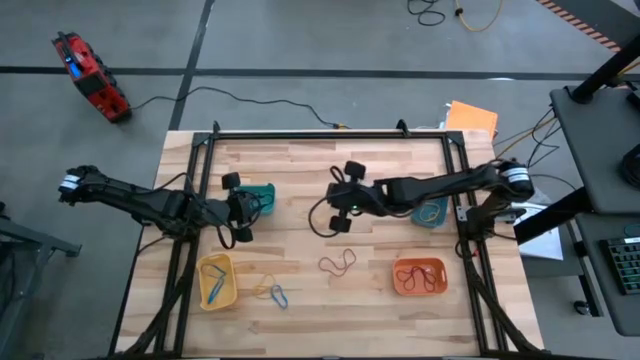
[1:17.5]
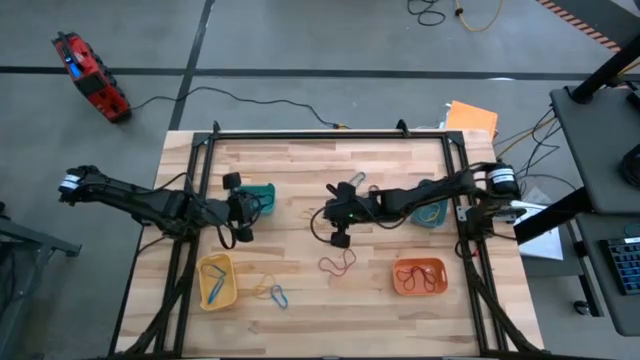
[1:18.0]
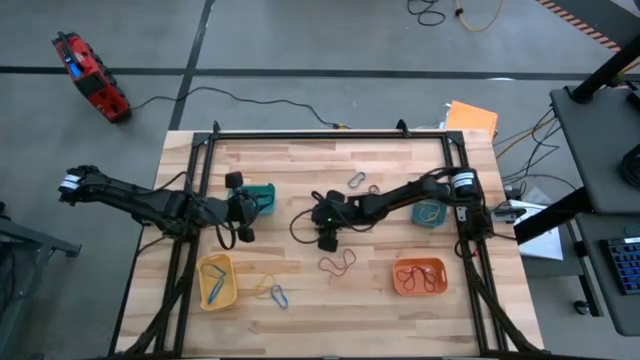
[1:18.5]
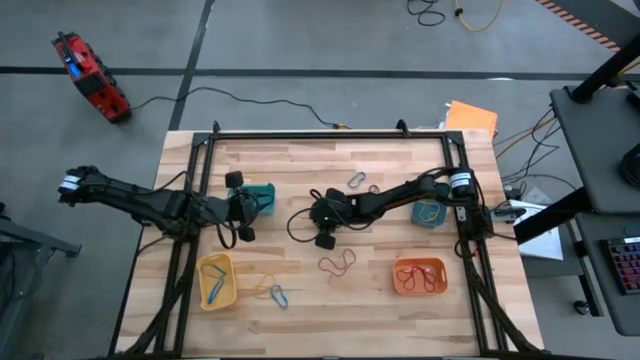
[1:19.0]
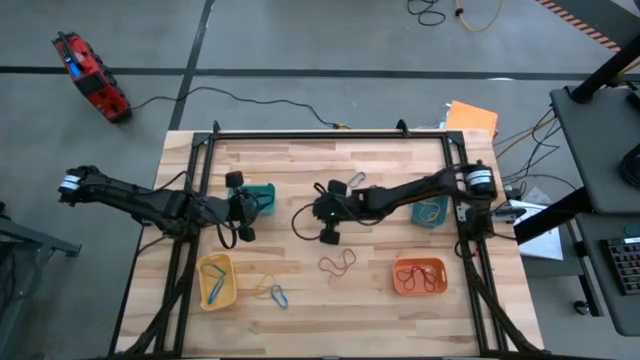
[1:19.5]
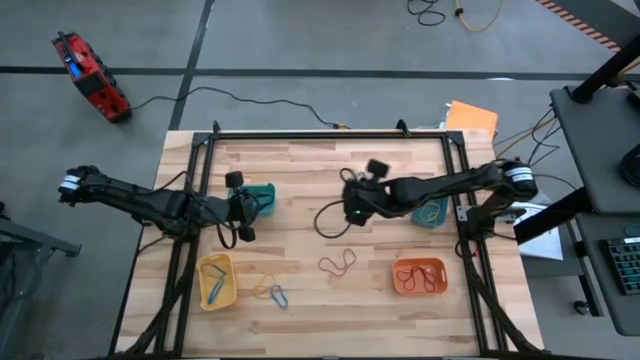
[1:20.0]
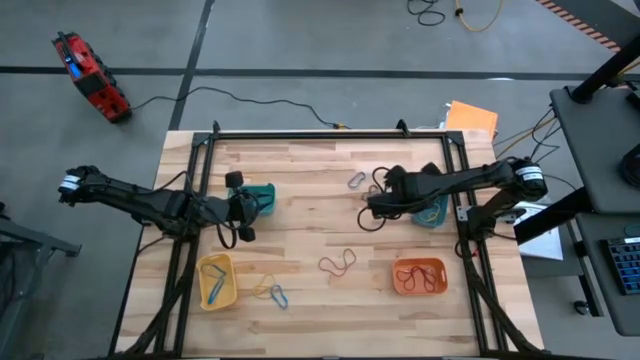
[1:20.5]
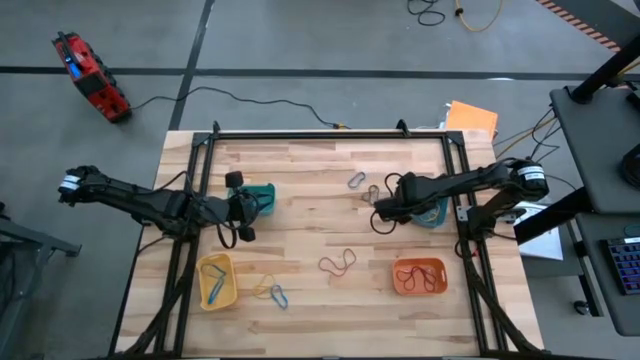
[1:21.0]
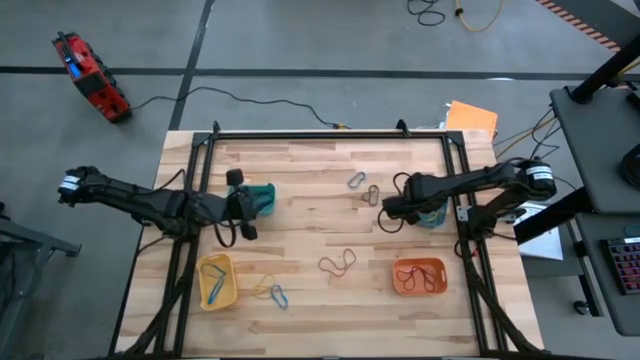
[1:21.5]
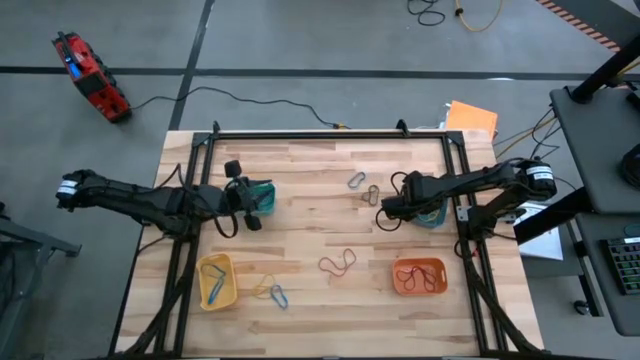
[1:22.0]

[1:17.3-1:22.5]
Task: Sort rubber bands into baskets
Put the yellow rubber band into the blue bin

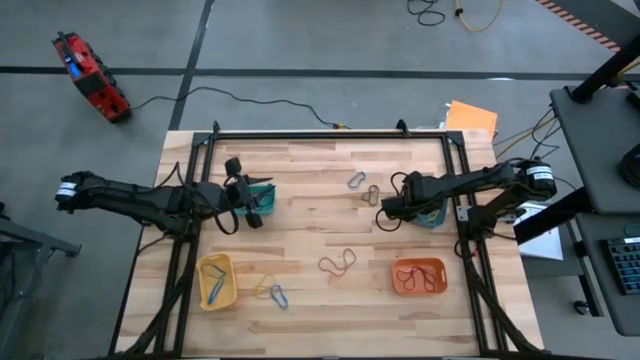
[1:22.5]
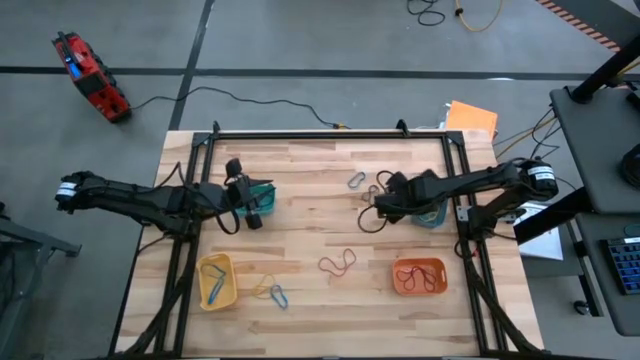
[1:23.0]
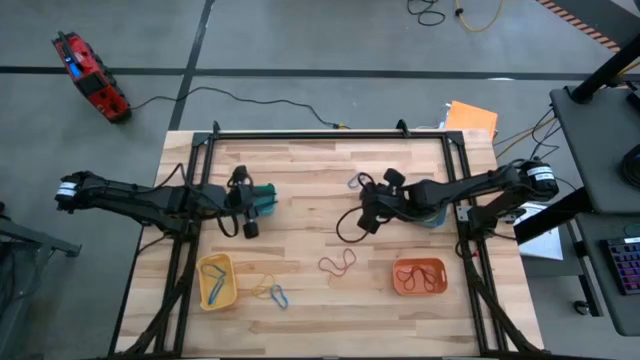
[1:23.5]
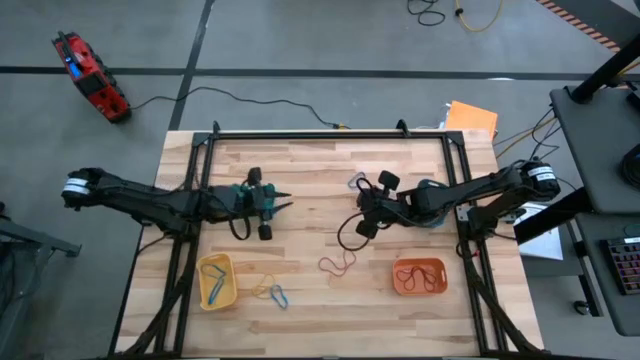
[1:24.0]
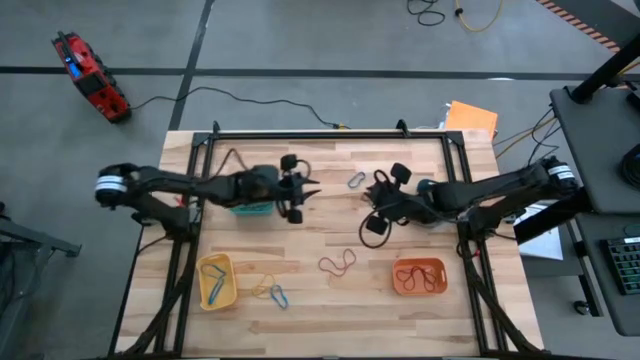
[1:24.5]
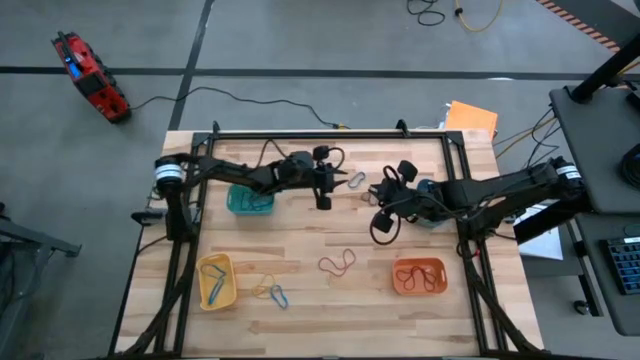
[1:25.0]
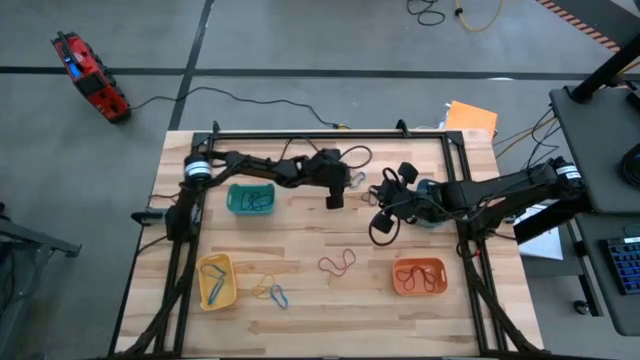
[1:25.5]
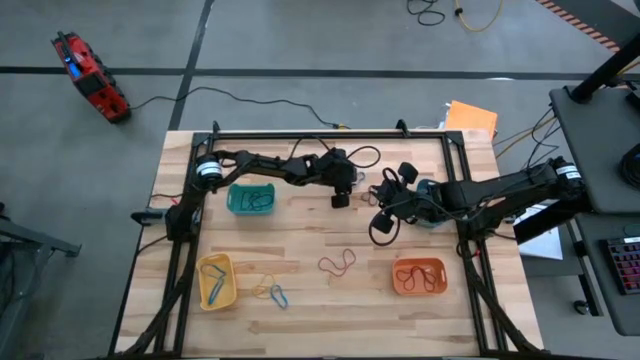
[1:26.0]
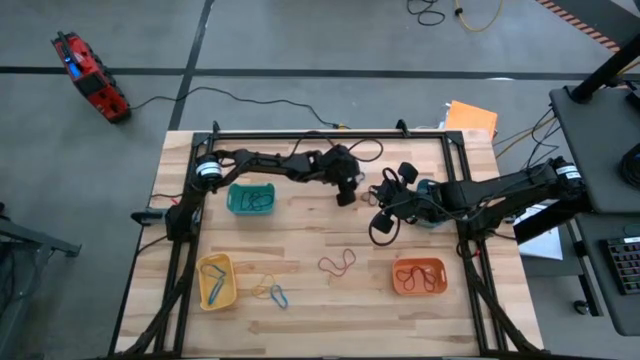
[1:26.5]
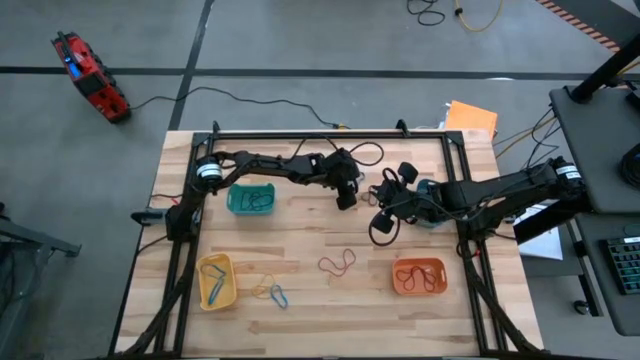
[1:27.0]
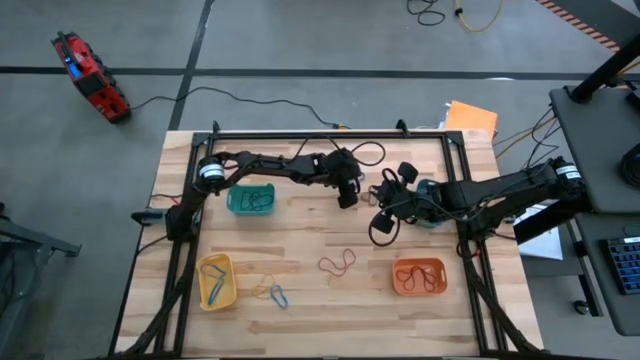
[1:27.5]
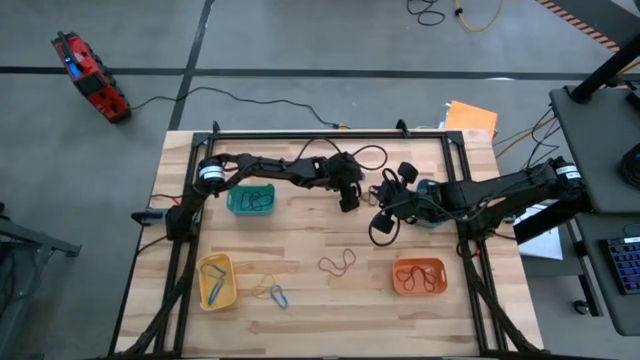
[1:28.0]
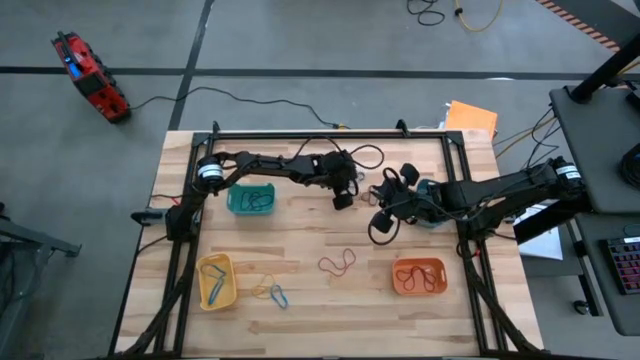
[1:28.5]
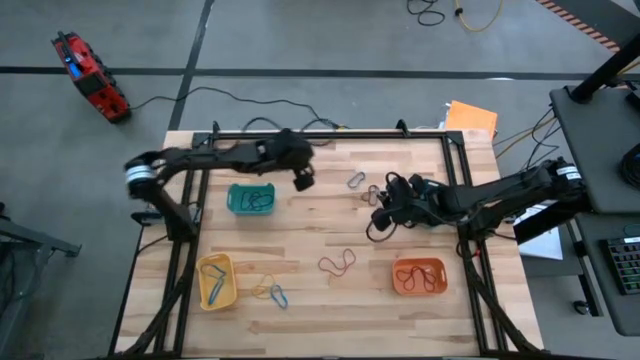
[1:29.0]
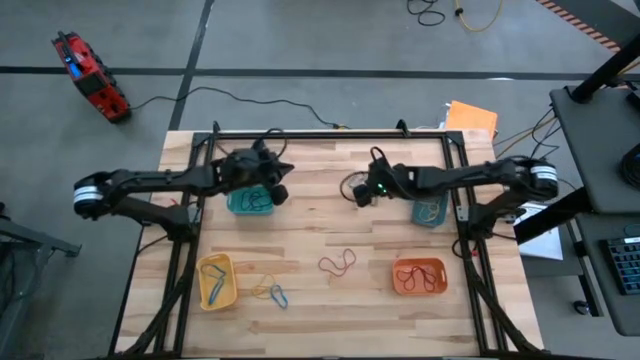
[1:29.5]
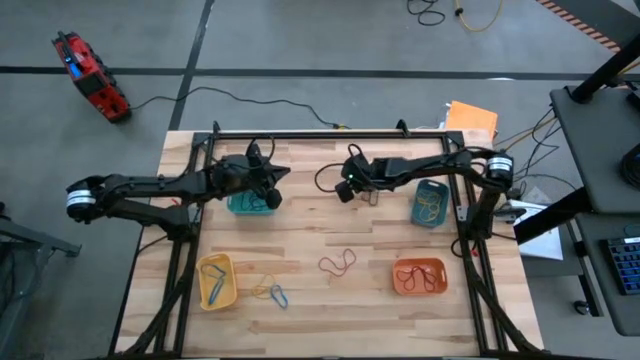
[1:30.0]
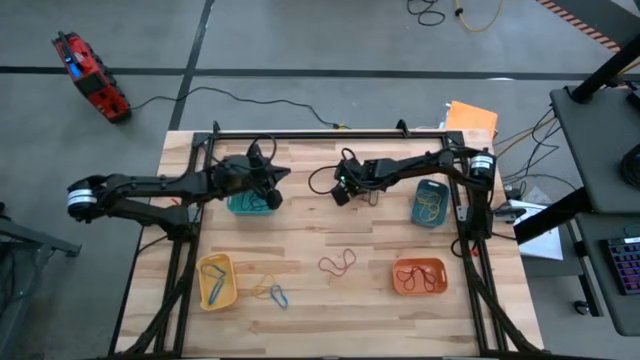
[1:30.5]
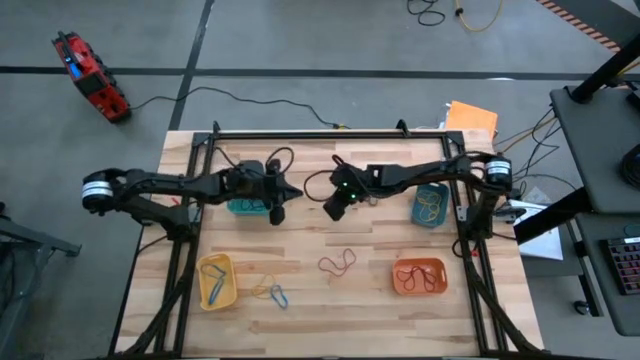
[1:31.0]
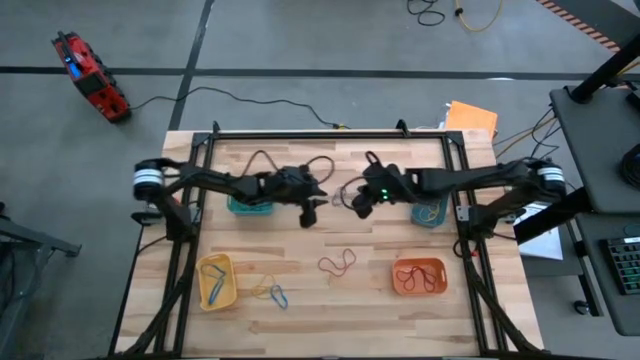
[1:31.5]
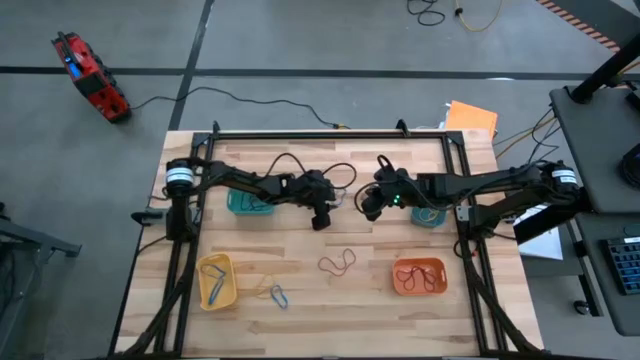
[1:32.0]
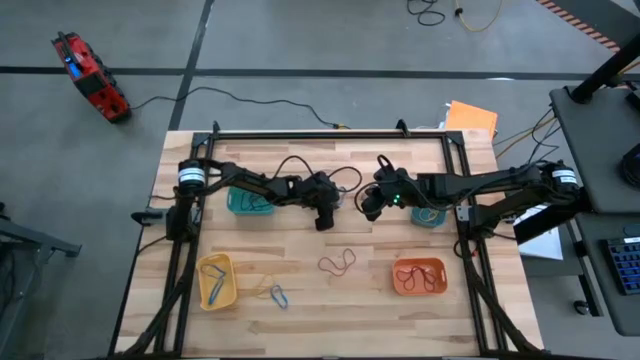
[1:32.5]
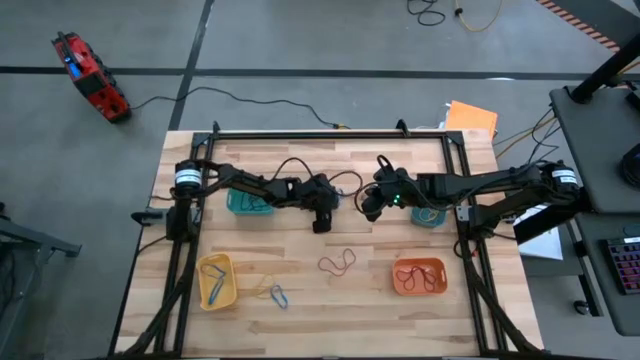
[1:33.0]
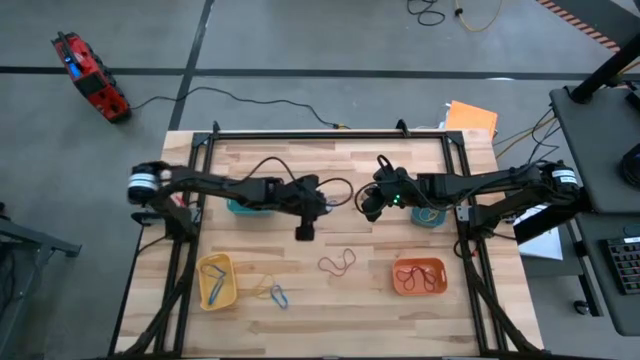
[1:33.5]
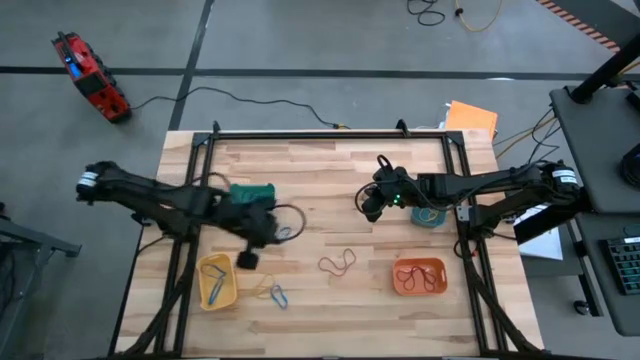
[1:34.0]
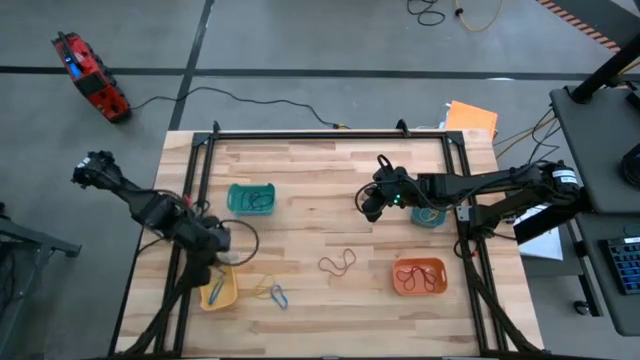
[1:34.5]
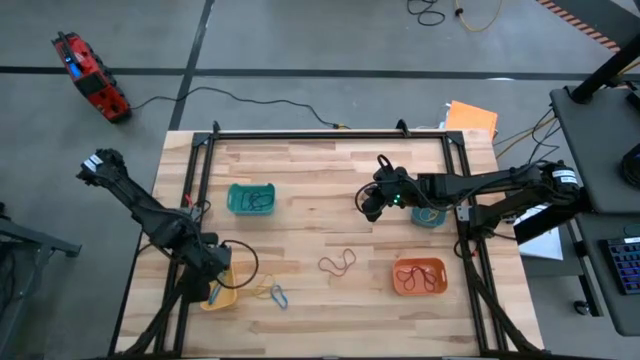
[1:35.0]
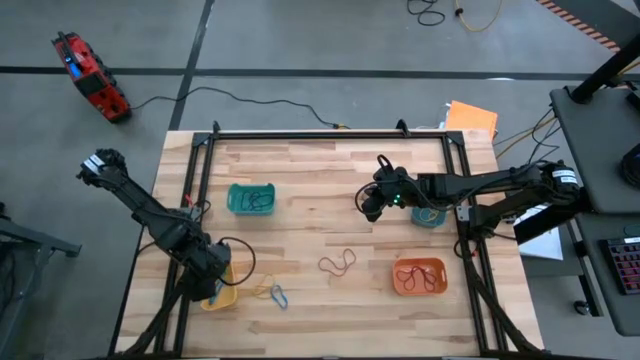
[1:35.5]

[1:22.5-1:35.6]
Put the blue rubber band into the yellow bin

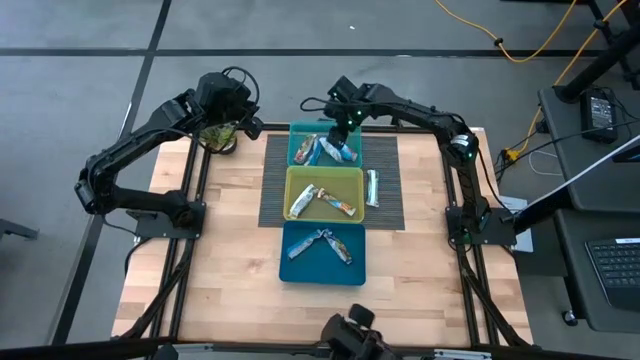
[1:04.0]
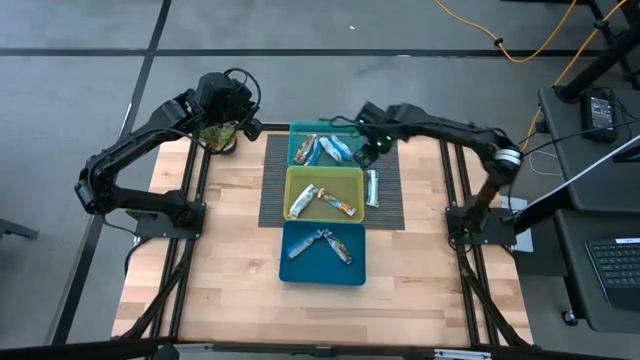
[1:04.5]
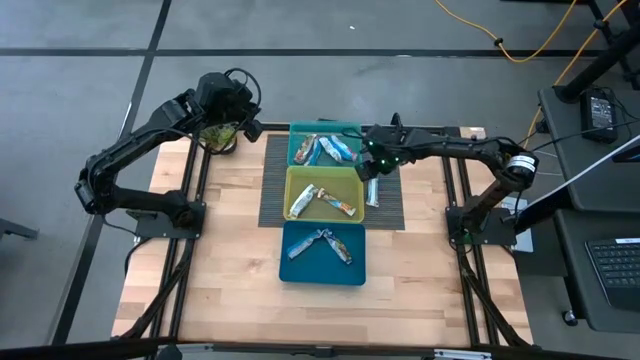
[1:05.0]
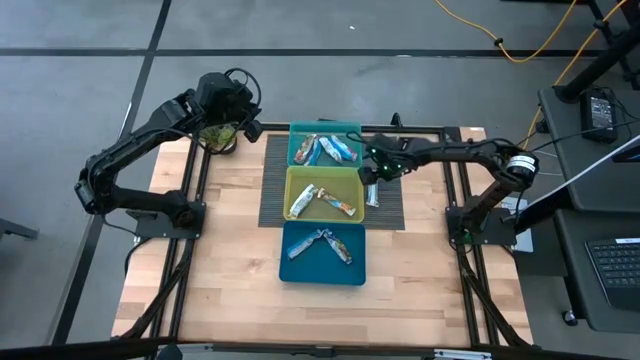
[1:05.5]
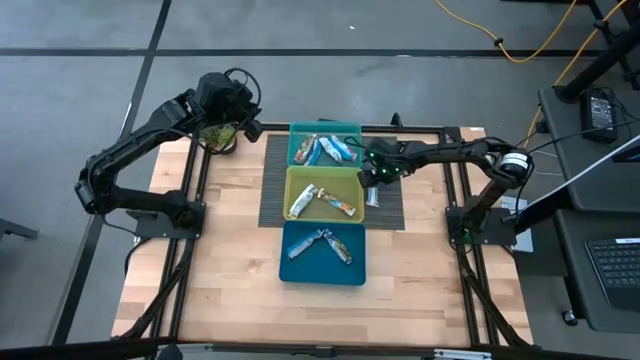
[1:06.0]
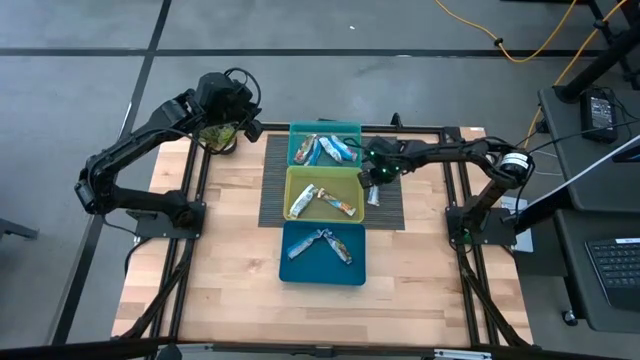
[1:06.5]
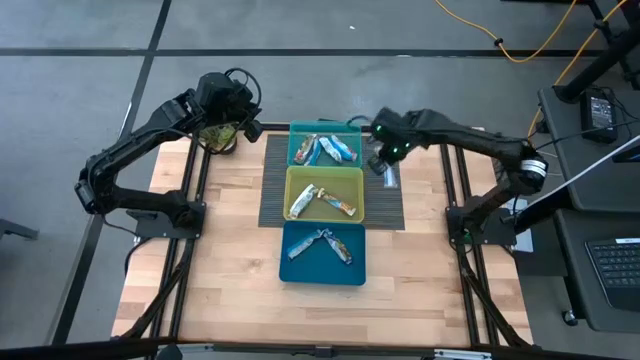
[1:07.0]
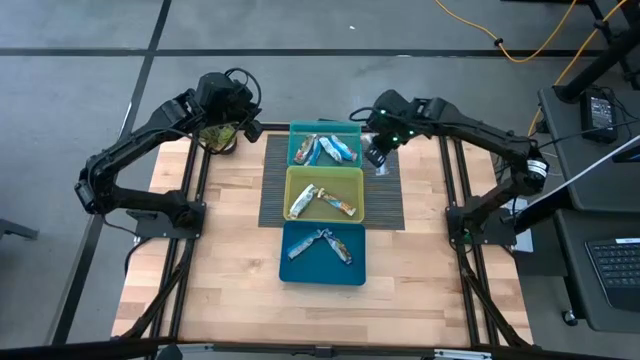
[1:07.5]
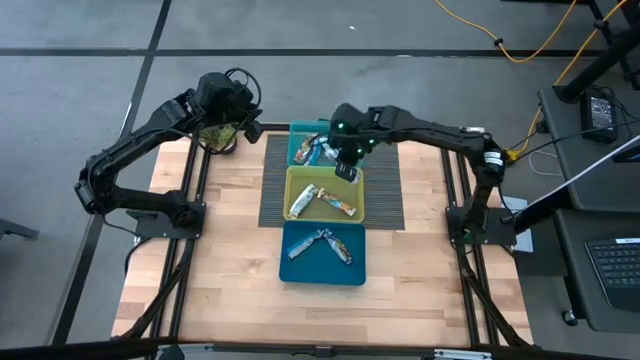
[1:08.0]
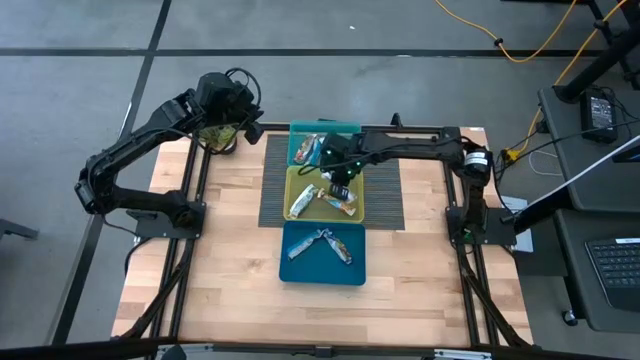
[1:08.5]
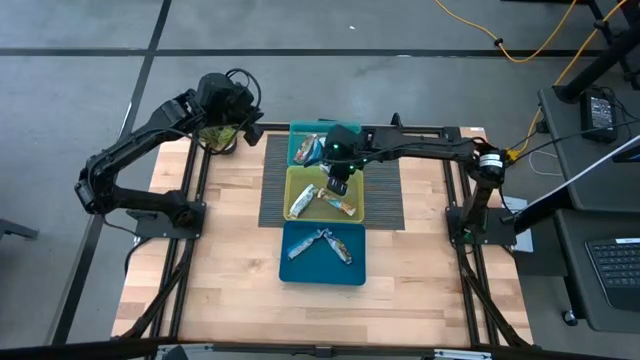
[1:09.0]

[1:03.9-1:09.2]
Task: Pick and place Granola Bars by type
Put the yellow granola bar into the yellow bin
